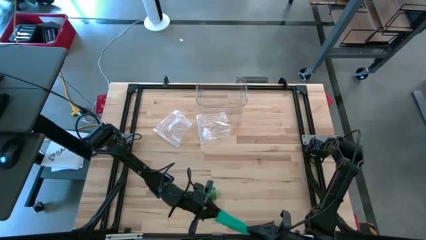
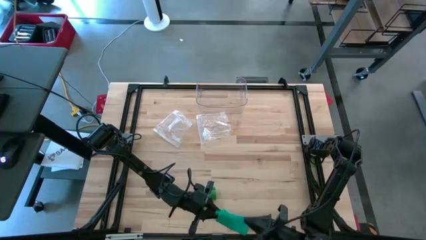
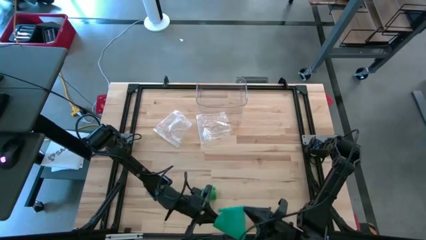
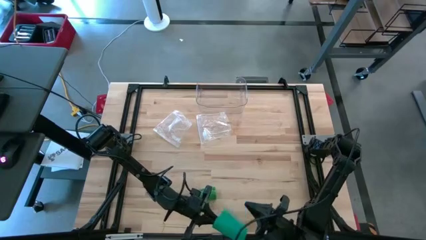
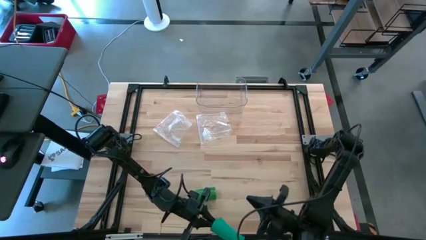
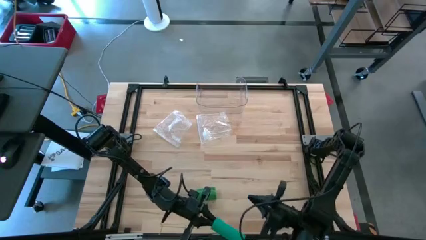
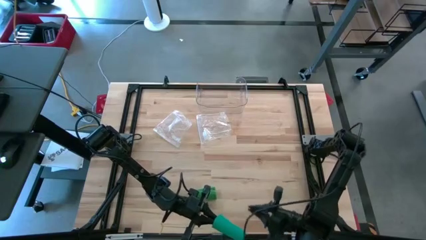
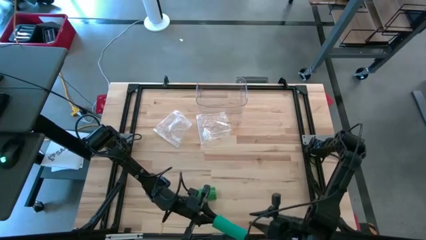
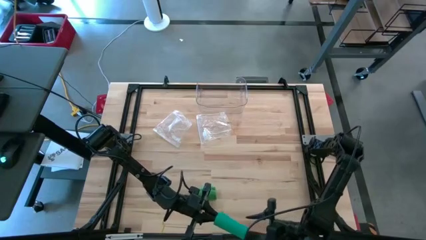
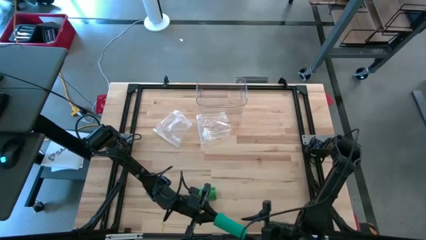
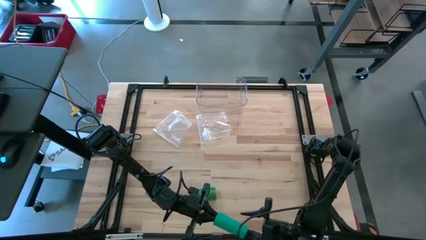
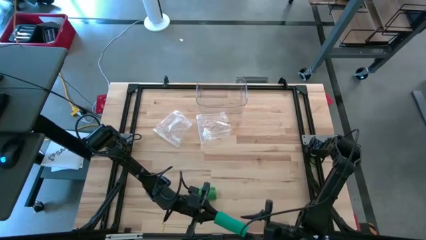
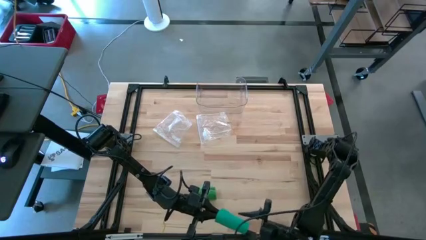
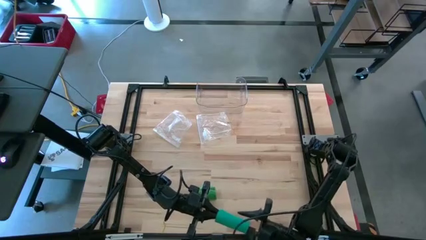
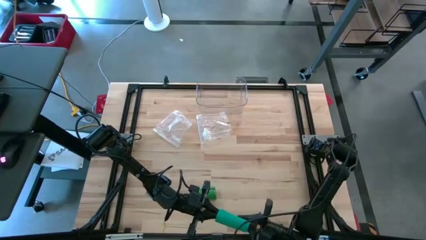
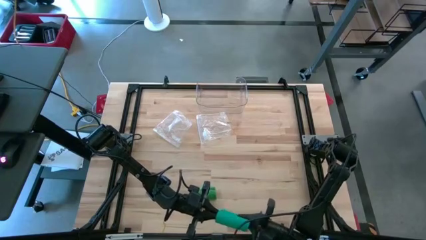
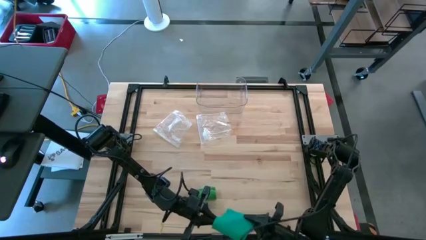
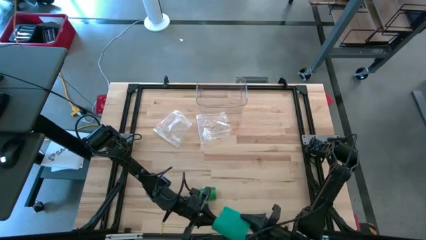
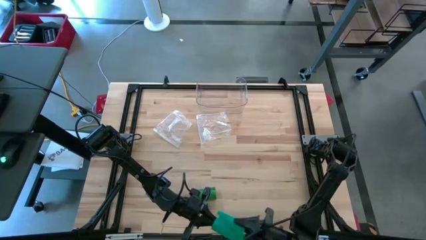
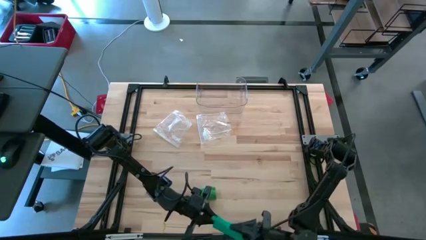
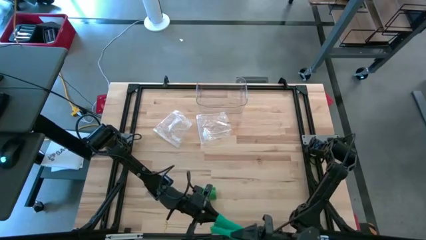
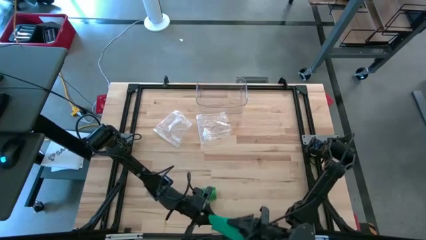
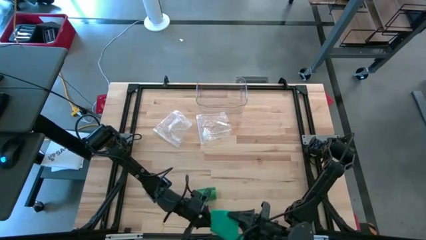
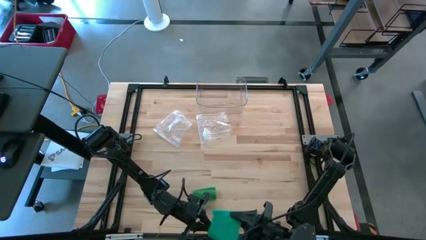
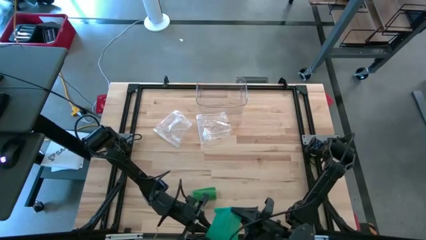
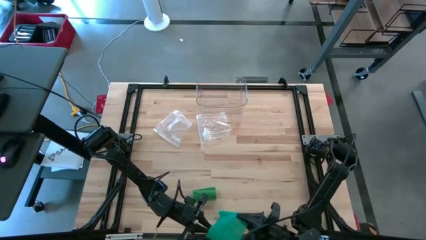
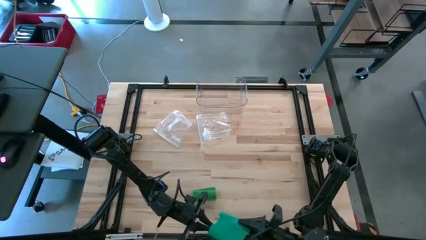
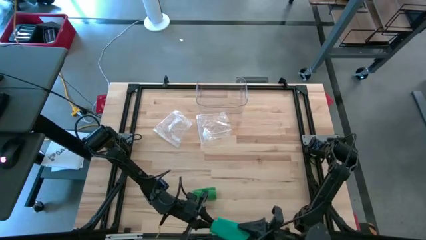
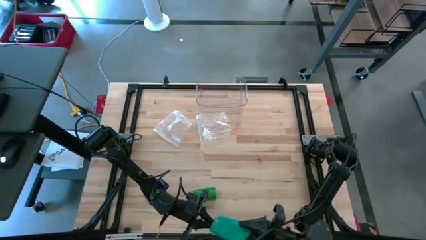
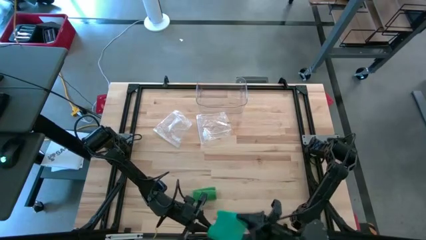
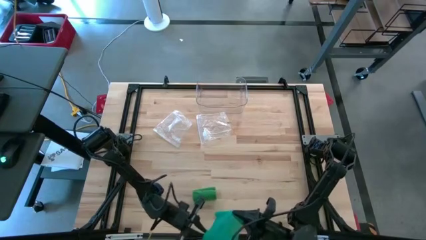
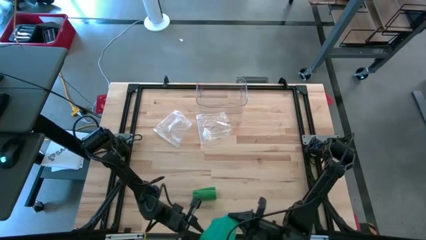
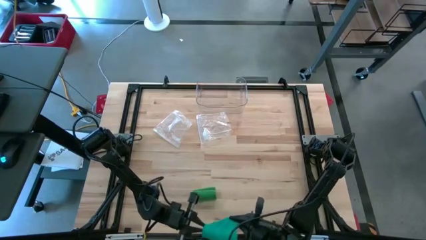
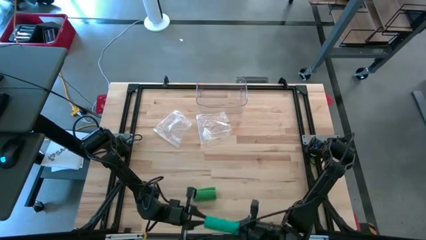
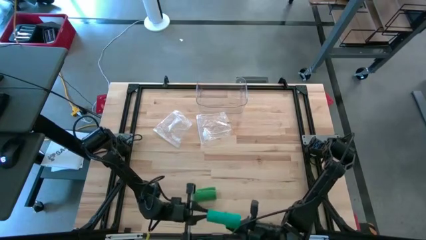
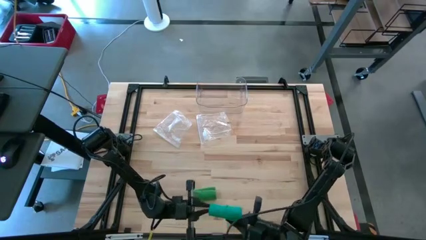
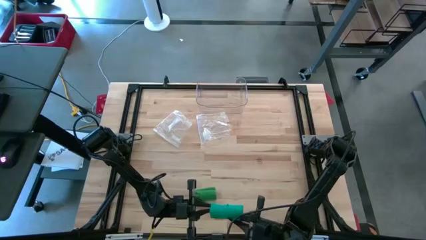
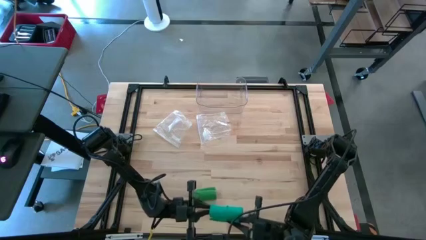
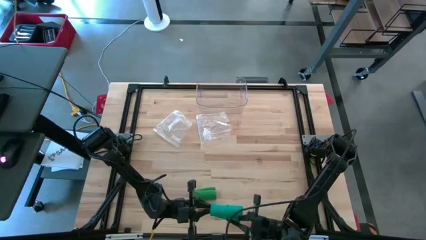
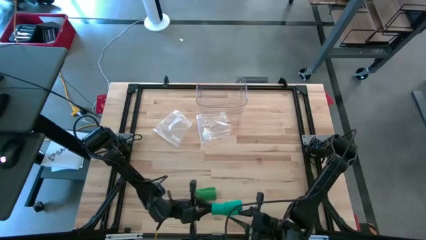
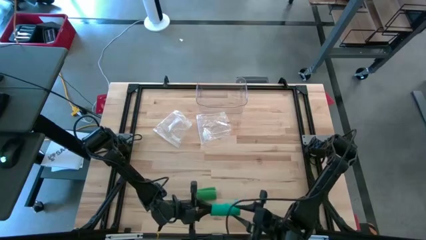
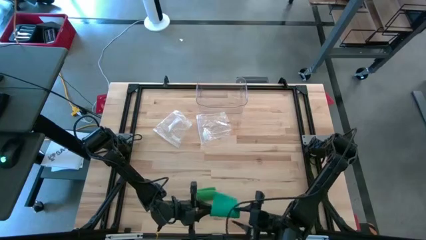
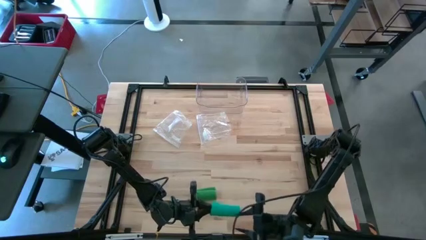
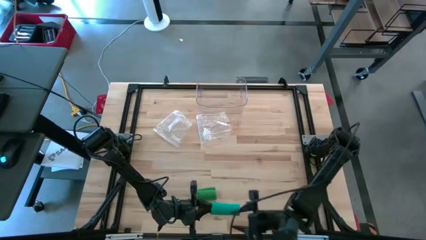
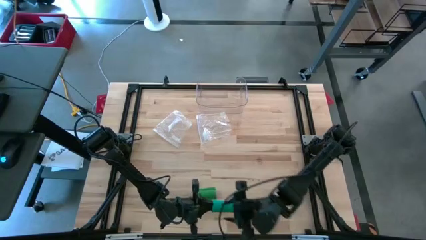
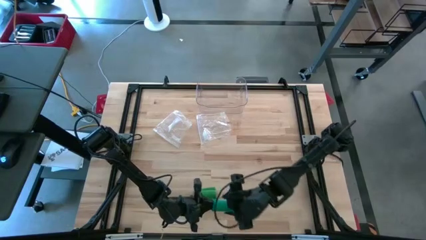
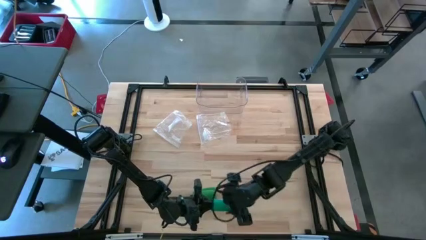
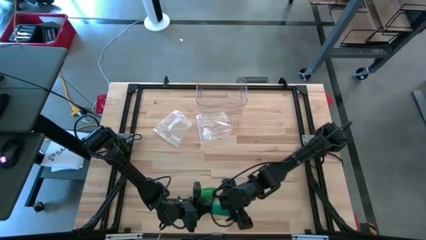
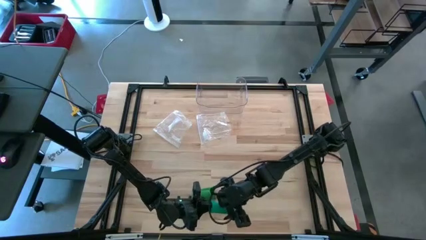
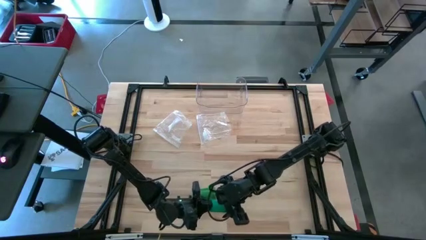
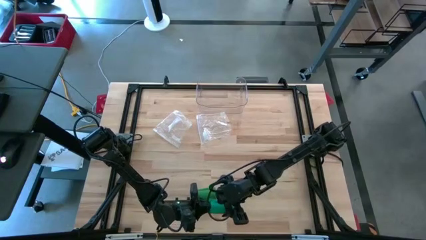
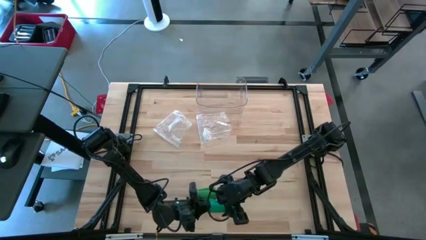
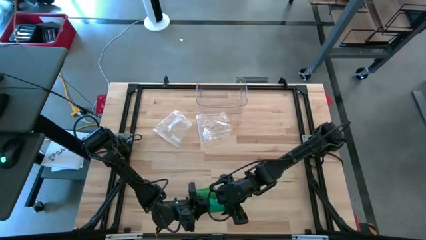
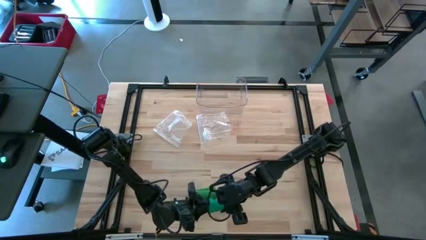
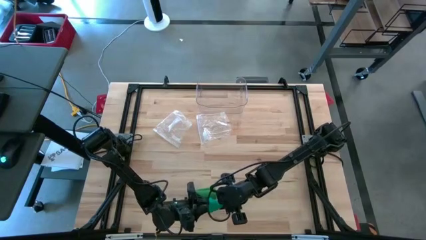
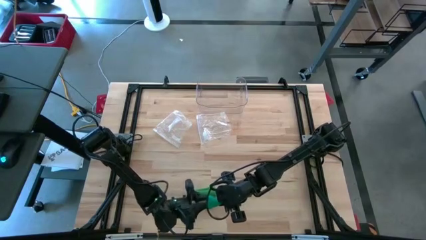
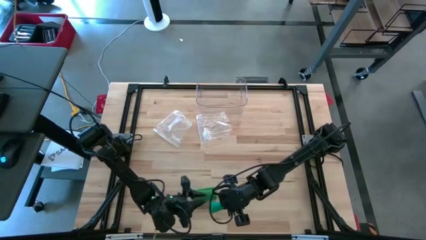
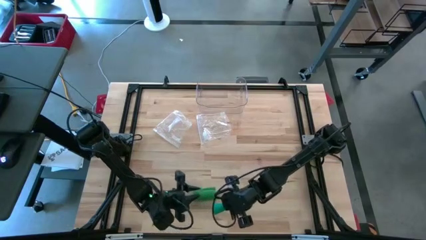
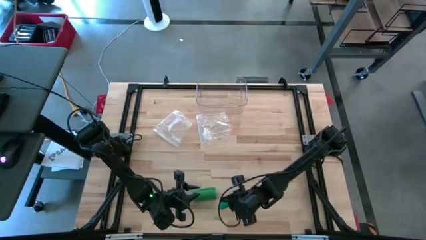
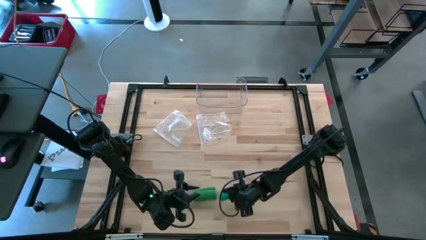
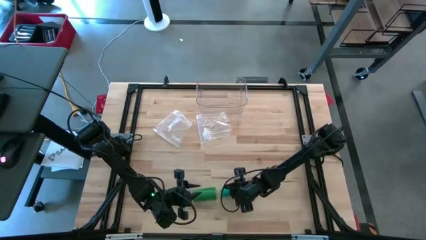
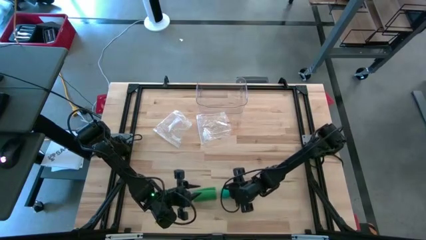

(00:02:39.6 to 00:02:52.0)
Task: Roll bandage
Roll the blue bandage
